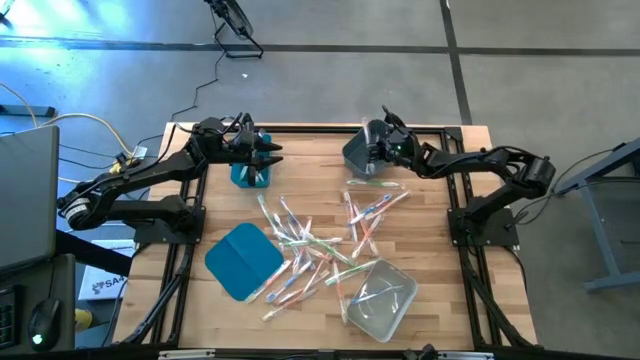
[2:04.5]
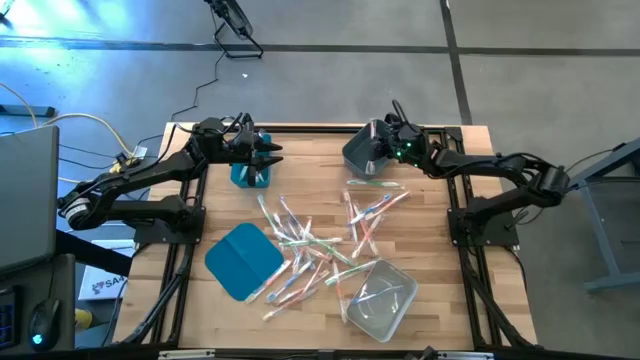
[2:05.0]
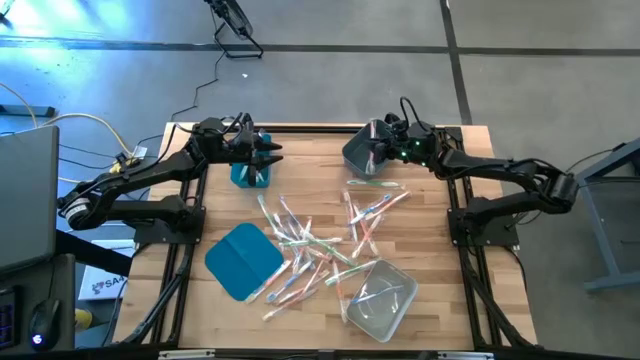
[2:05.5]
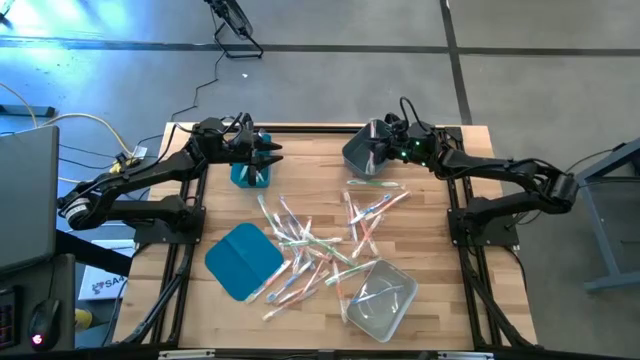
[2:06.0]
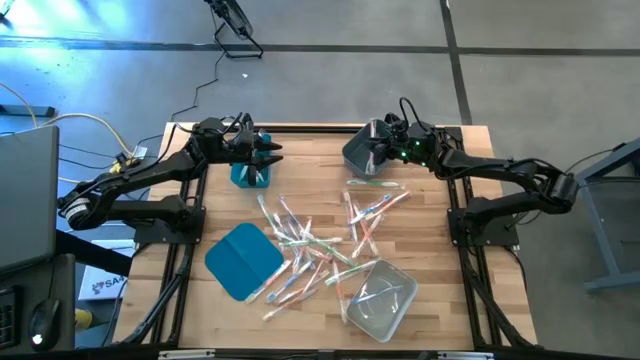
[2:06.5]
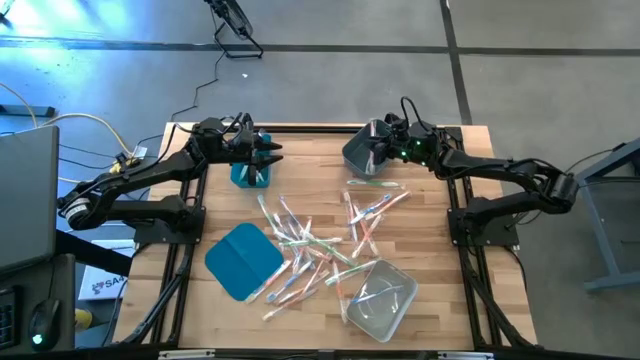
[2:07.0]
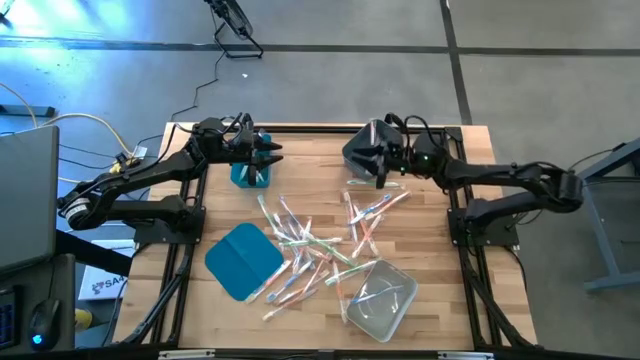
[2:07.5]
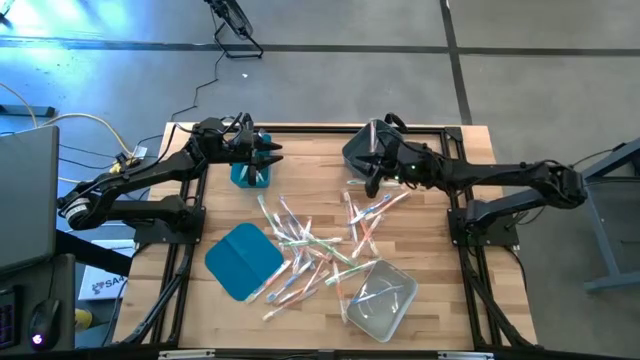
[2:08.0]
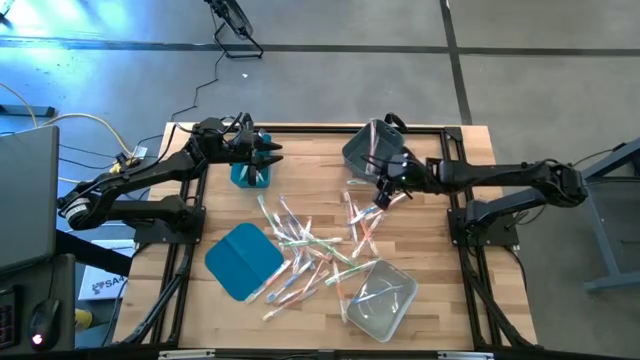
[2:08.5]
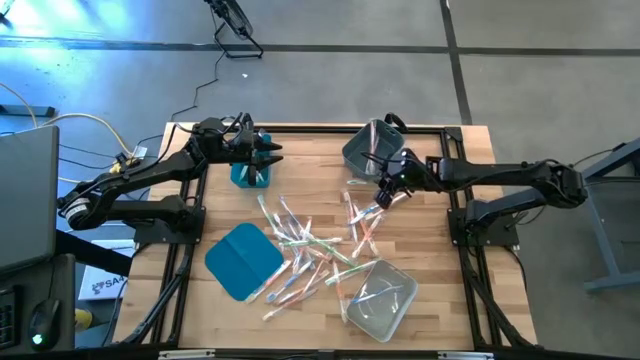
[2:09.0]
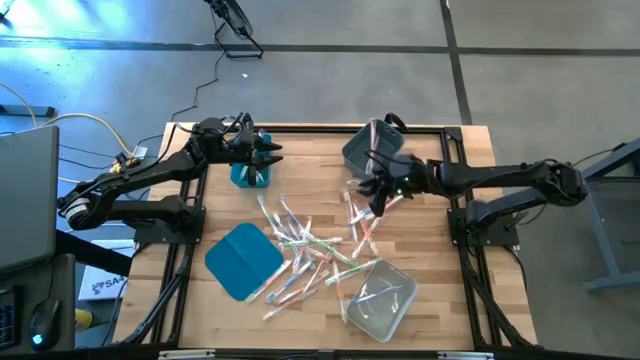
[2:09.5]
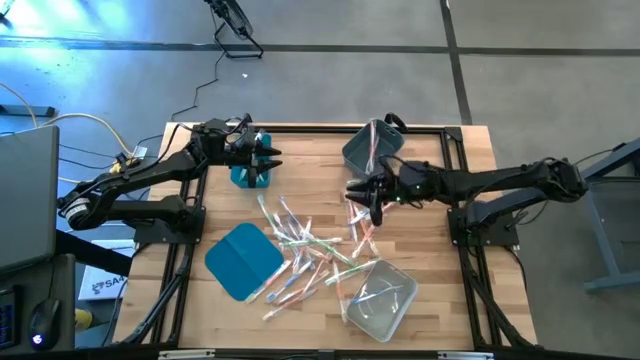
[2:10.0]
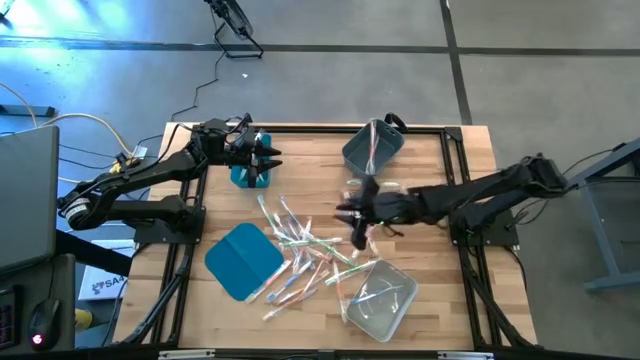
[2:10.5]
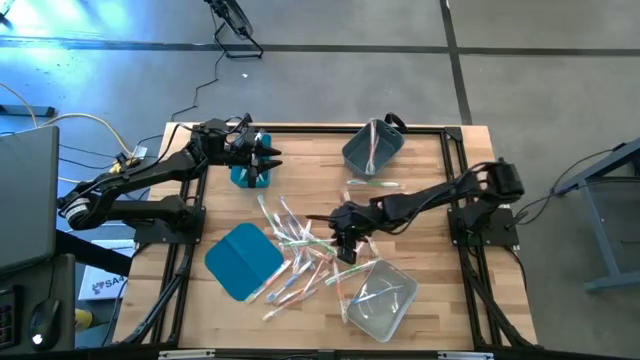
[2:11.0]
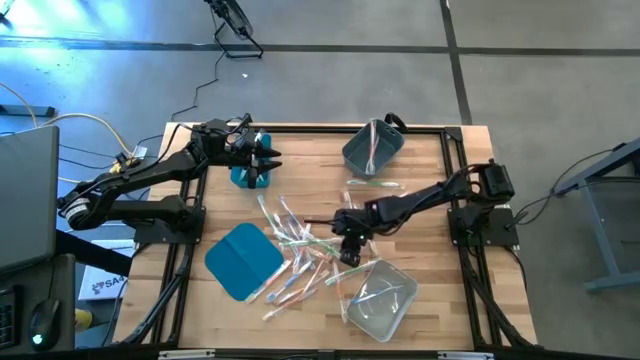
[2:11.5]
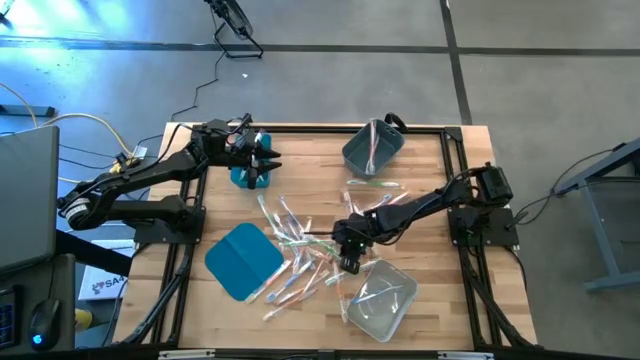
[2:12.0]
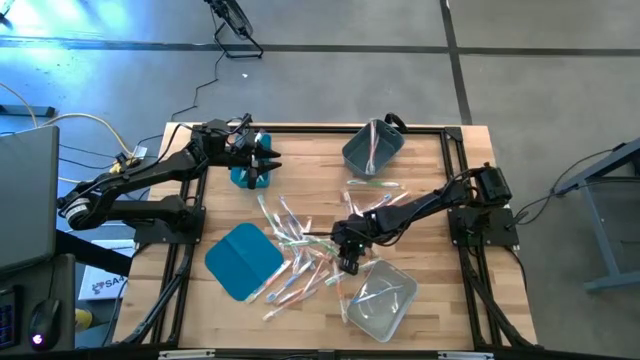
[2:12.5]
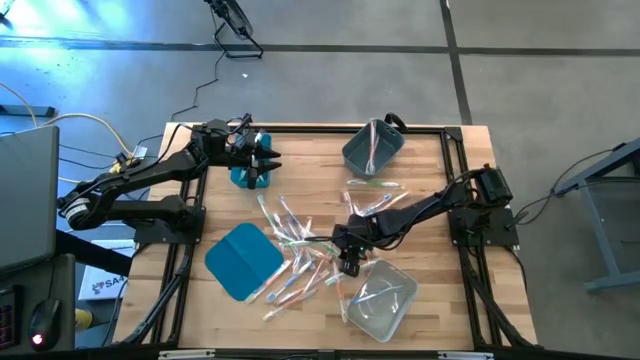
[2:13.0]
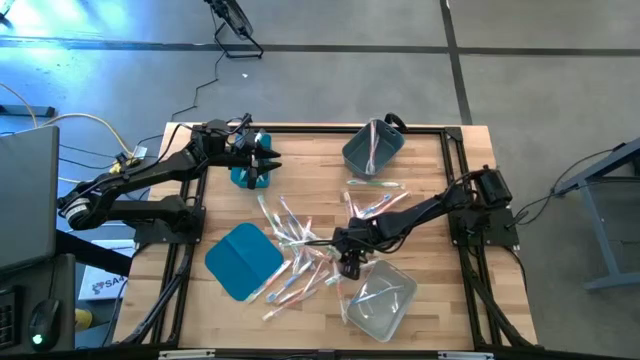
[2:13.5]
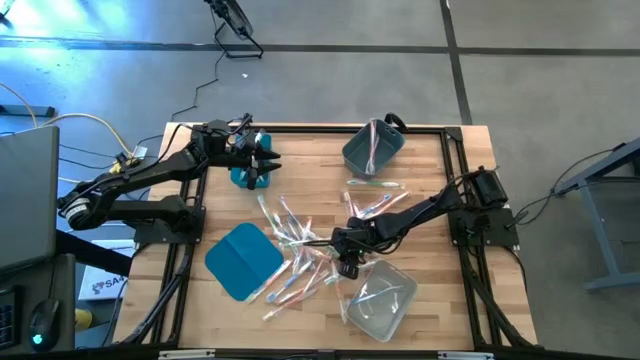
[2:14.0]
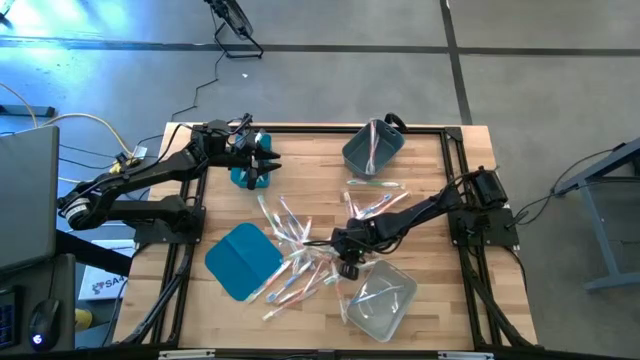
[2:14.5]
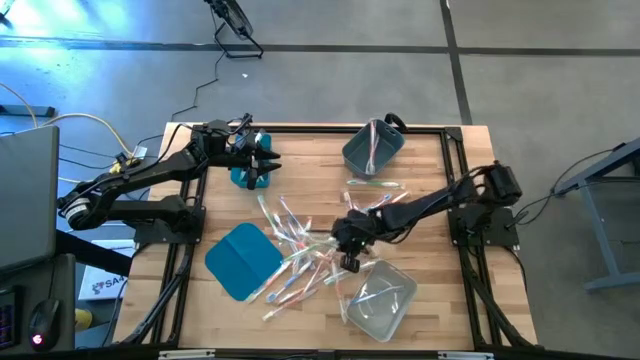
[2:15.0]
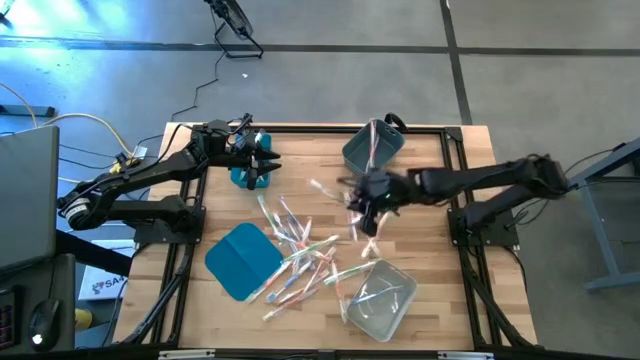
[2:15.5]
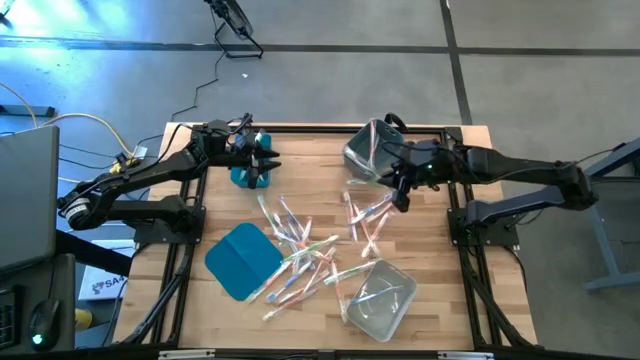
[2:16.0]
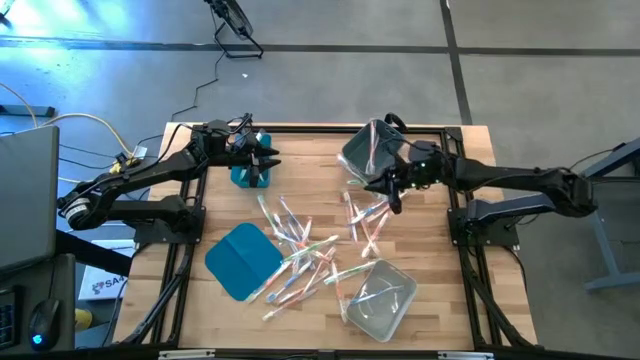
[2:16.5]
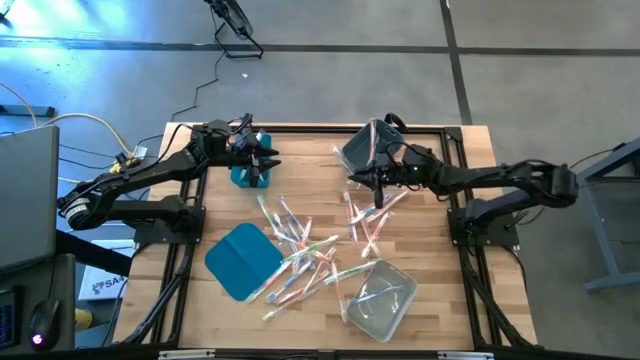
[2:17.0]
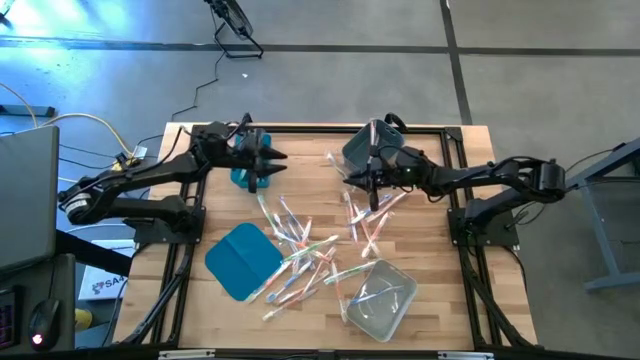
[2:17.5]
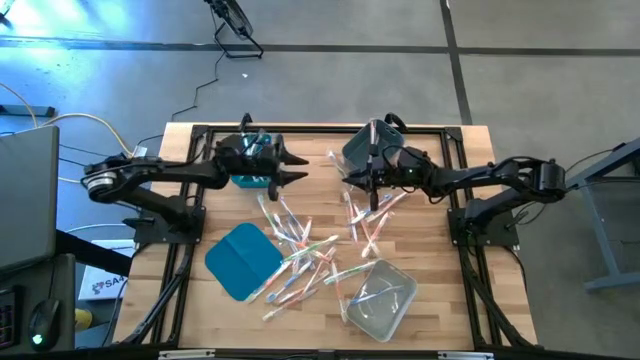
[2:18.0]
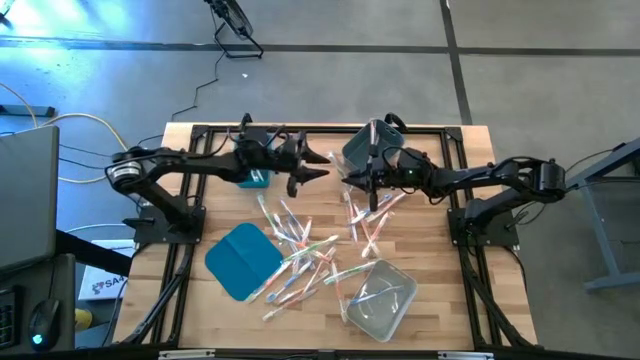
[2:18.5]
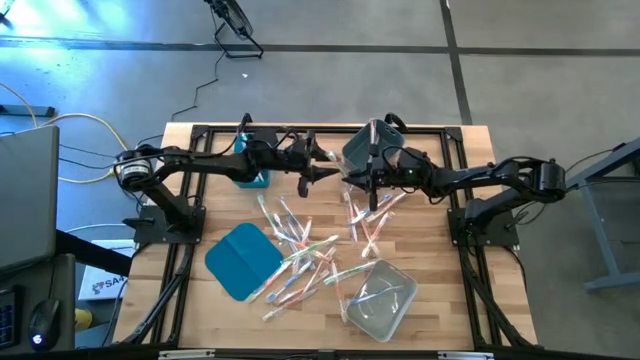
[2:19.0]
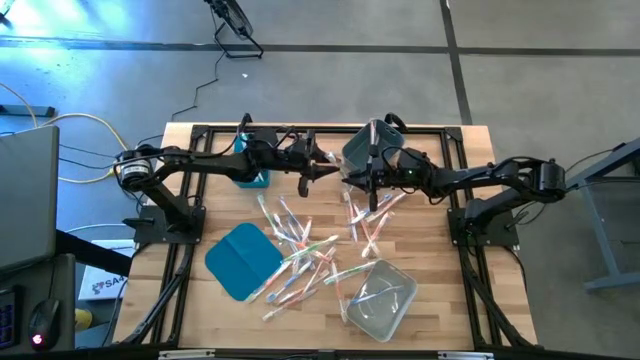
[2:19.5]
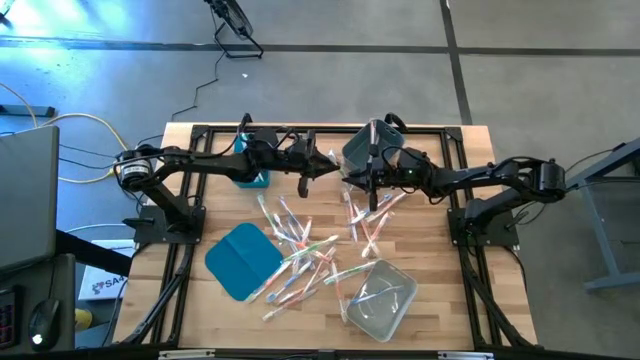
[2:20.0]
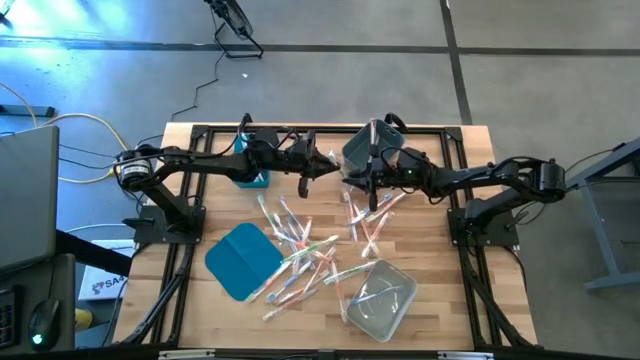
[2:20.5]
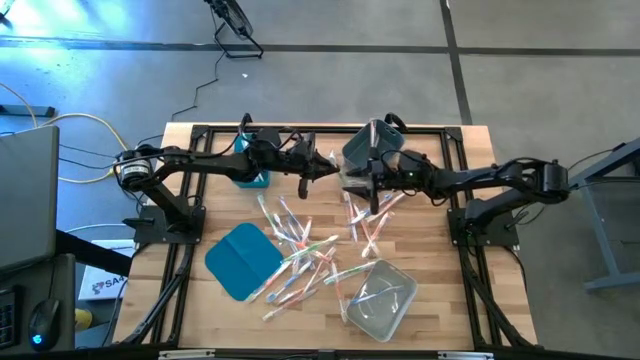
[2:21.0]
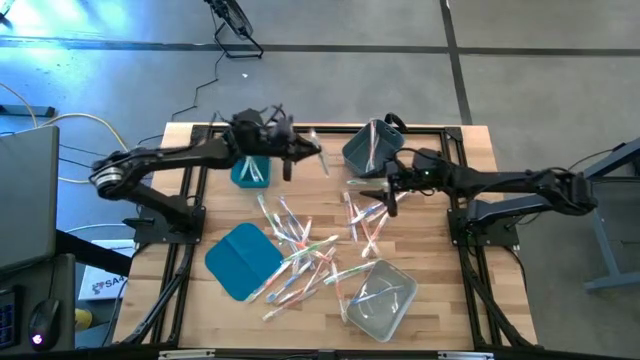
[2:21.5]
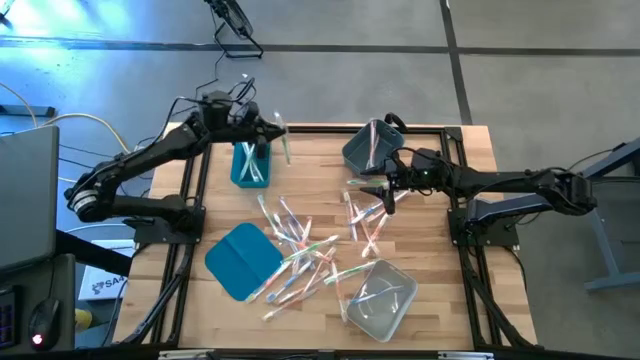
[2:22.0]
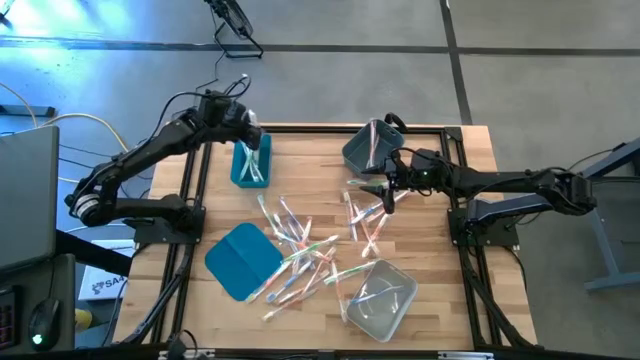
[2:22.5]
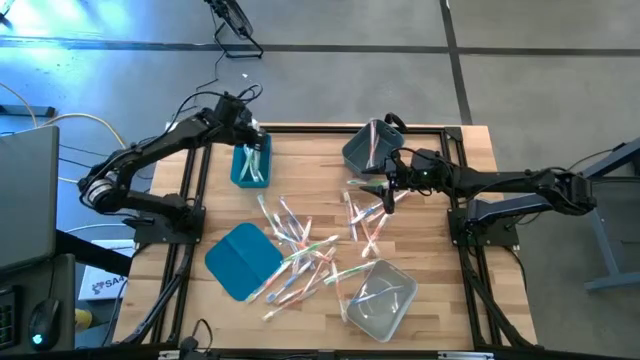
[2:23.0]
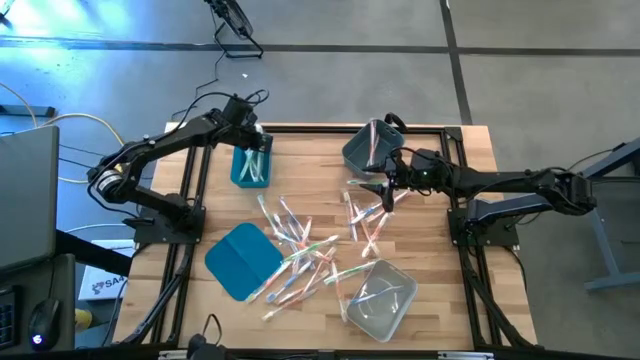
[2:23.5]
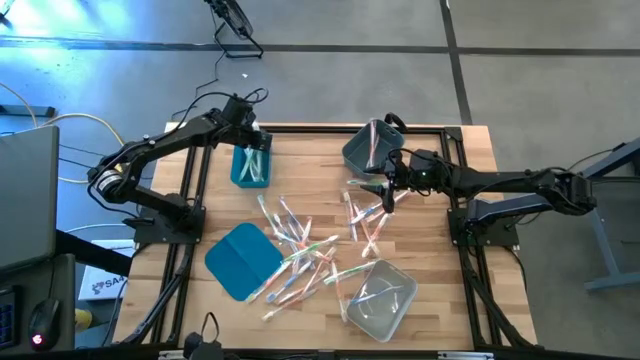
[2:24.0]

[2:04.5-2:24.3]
Task: Pick & Place Toothbrushes
Put the green toothbrush into the blue bin
